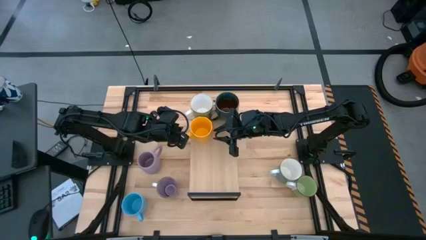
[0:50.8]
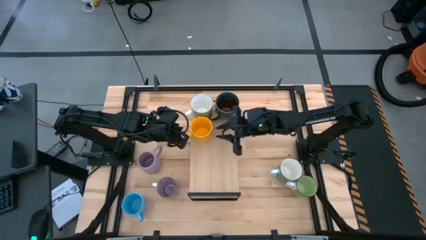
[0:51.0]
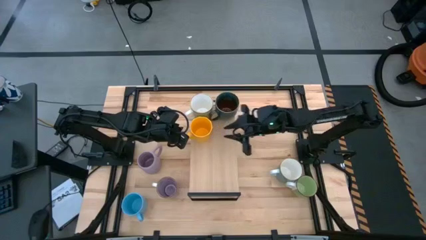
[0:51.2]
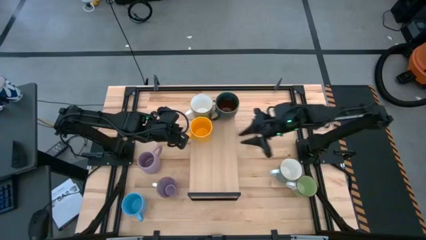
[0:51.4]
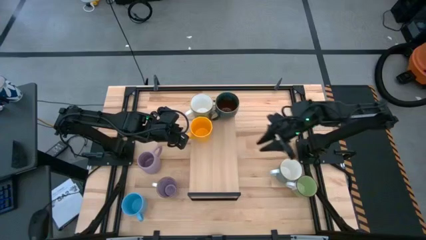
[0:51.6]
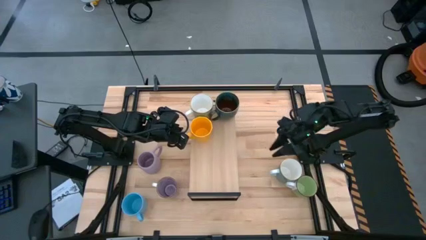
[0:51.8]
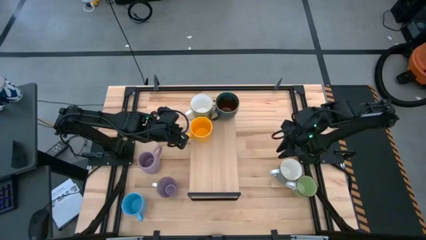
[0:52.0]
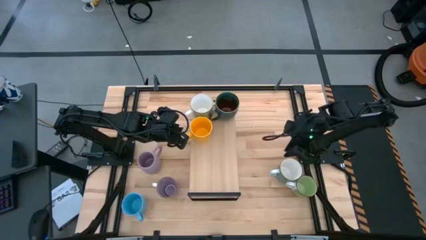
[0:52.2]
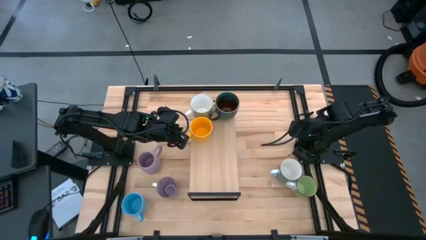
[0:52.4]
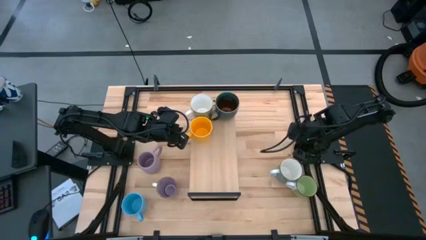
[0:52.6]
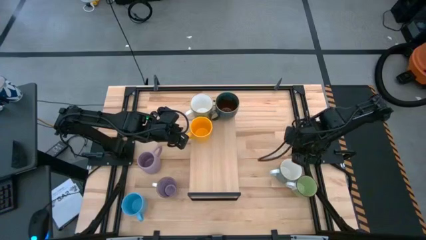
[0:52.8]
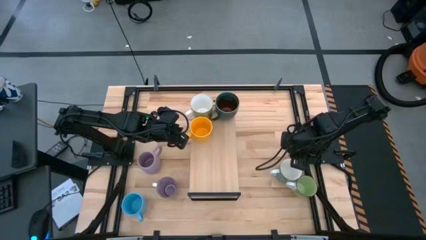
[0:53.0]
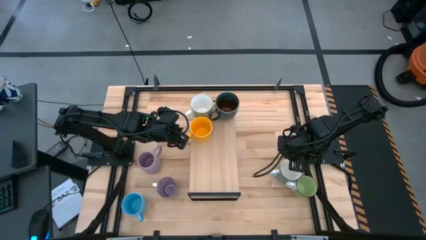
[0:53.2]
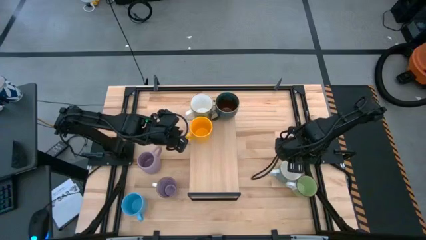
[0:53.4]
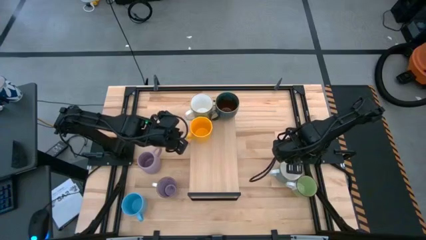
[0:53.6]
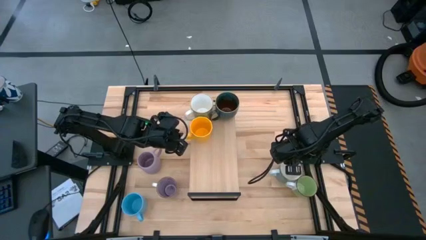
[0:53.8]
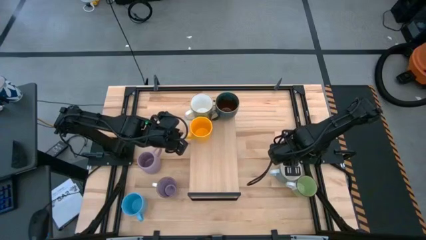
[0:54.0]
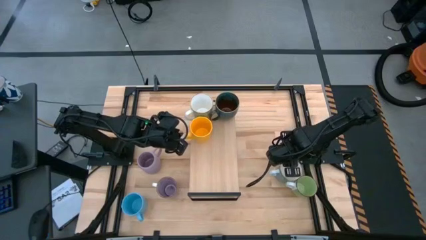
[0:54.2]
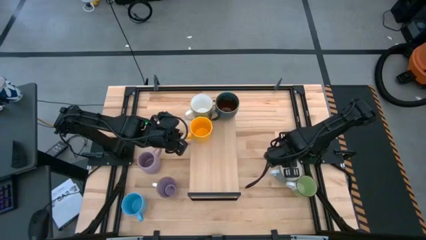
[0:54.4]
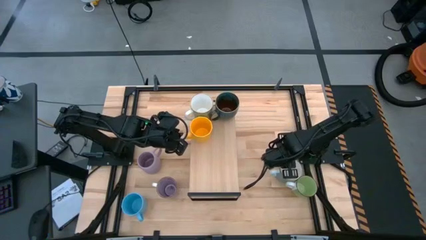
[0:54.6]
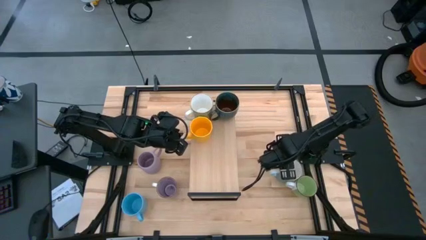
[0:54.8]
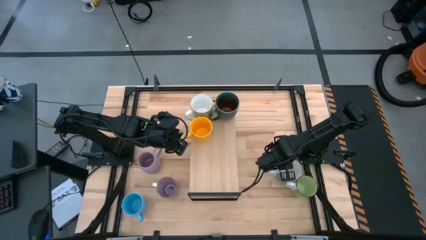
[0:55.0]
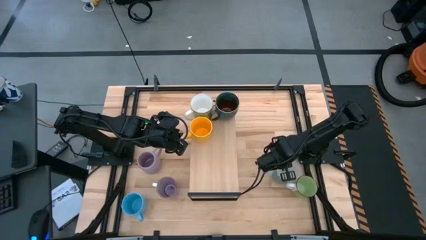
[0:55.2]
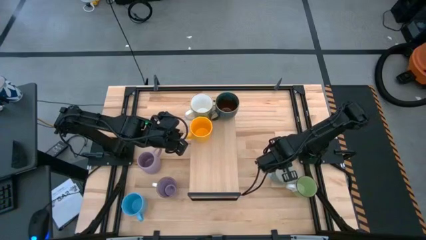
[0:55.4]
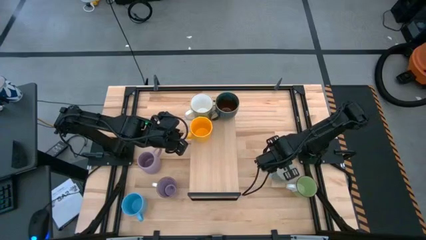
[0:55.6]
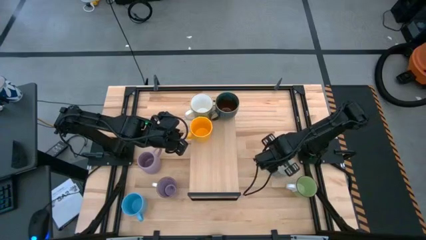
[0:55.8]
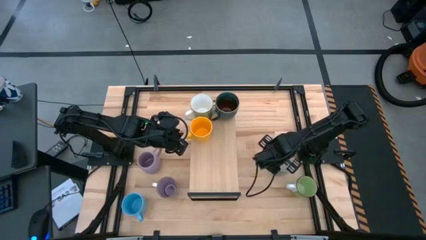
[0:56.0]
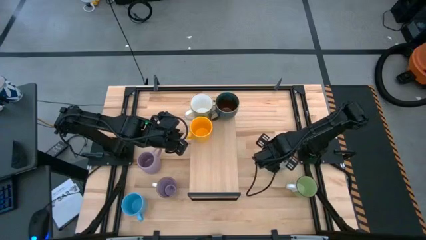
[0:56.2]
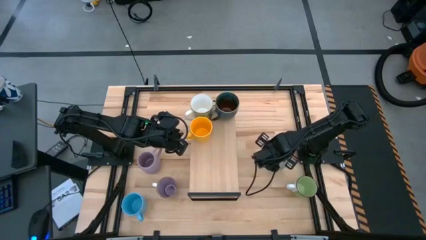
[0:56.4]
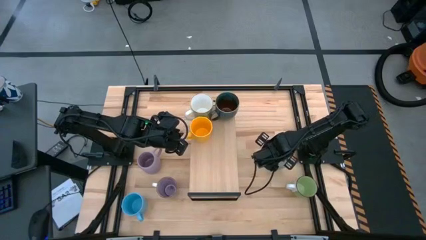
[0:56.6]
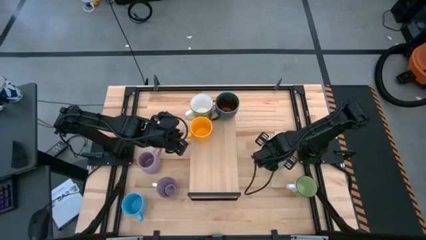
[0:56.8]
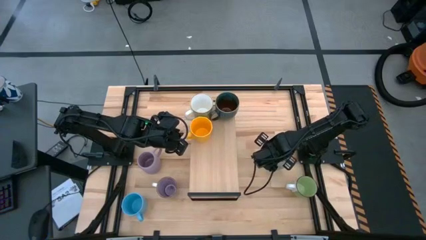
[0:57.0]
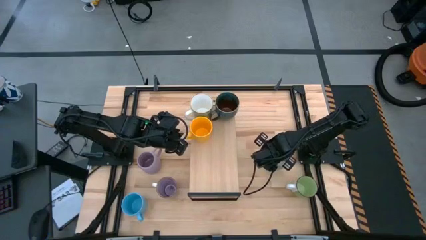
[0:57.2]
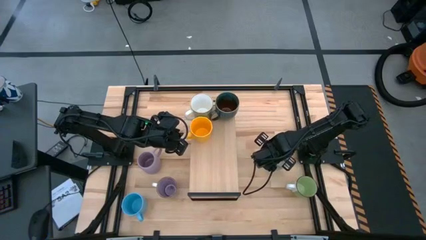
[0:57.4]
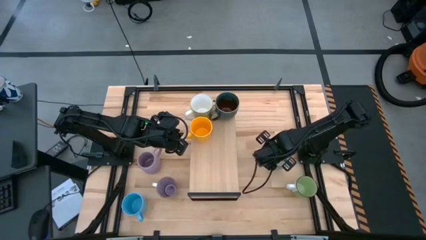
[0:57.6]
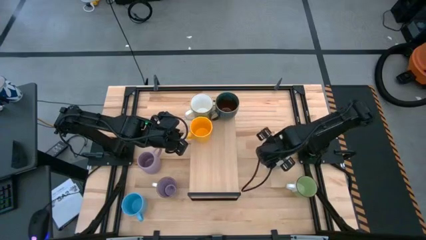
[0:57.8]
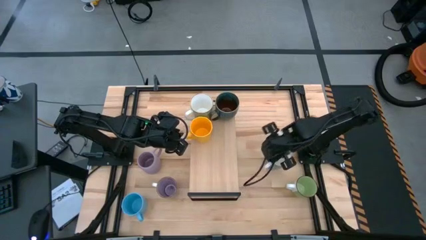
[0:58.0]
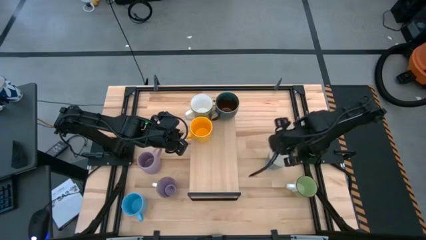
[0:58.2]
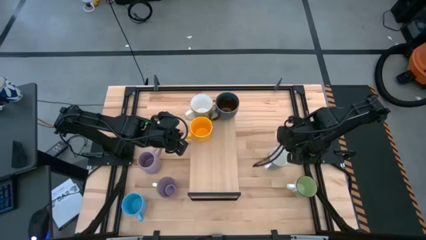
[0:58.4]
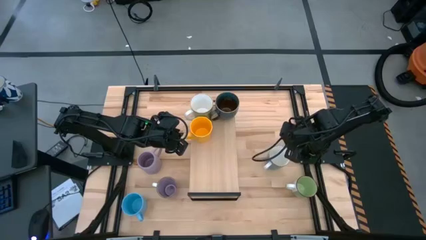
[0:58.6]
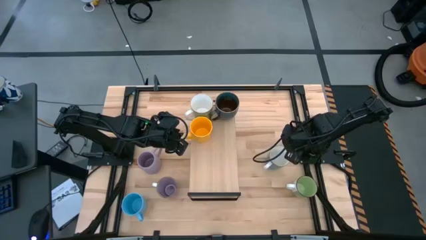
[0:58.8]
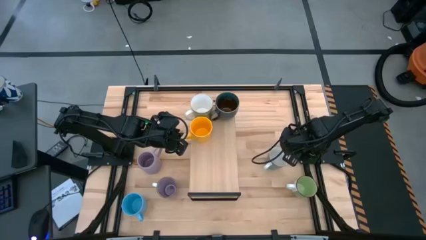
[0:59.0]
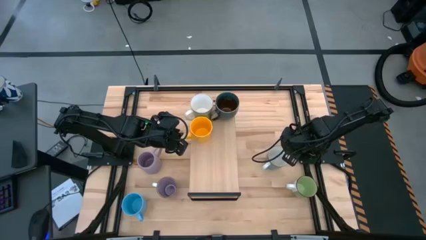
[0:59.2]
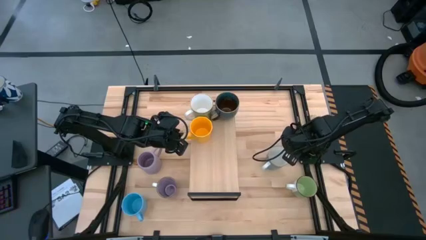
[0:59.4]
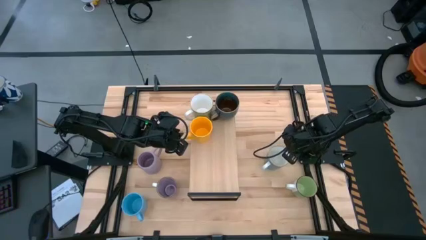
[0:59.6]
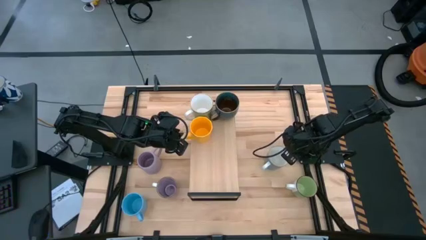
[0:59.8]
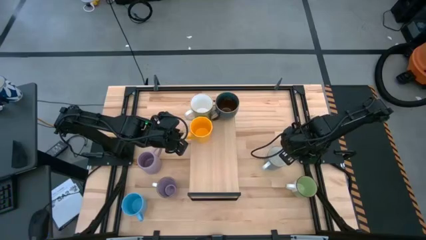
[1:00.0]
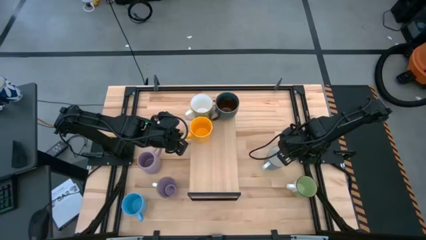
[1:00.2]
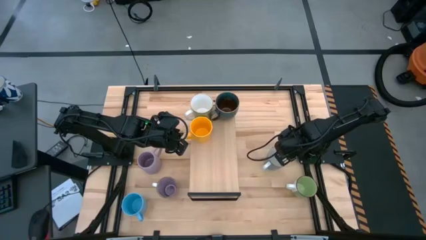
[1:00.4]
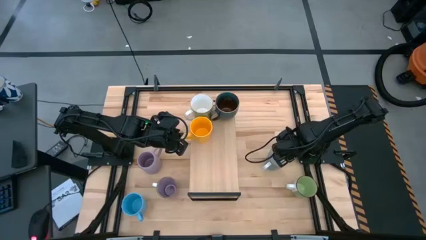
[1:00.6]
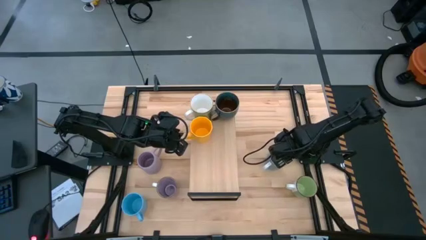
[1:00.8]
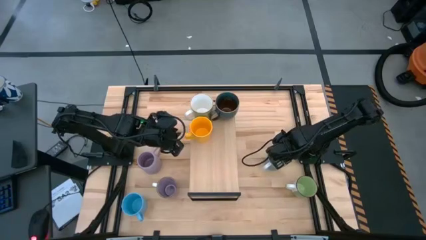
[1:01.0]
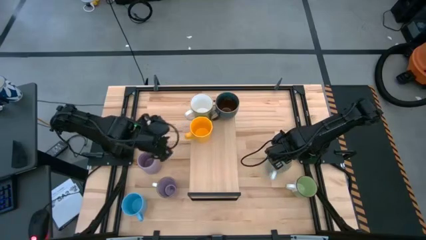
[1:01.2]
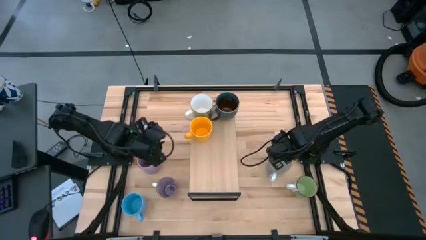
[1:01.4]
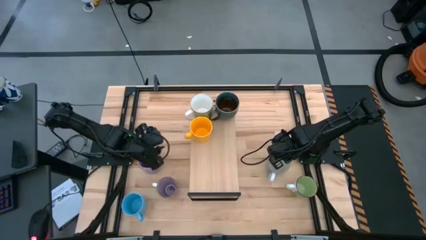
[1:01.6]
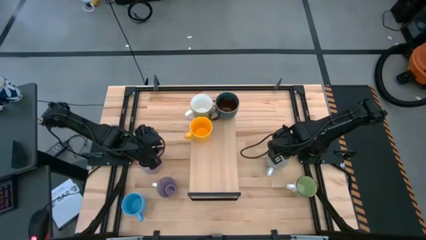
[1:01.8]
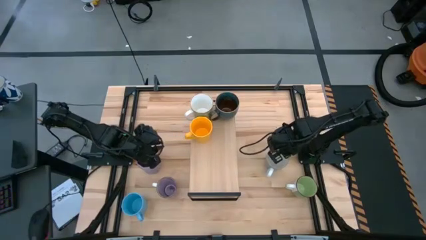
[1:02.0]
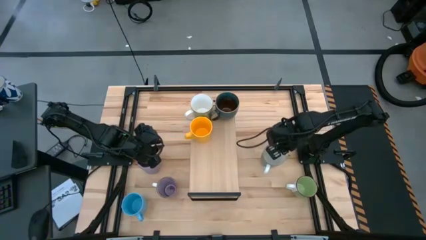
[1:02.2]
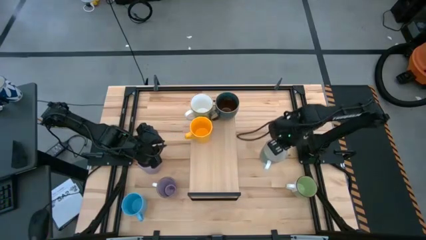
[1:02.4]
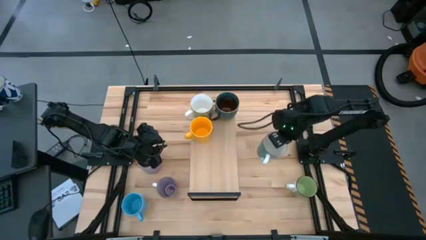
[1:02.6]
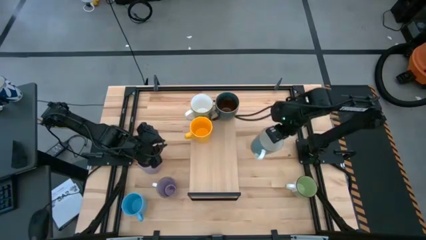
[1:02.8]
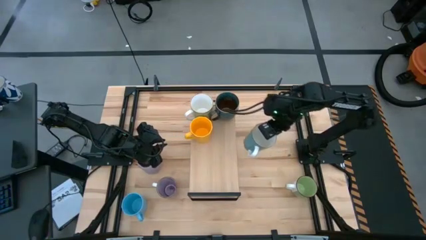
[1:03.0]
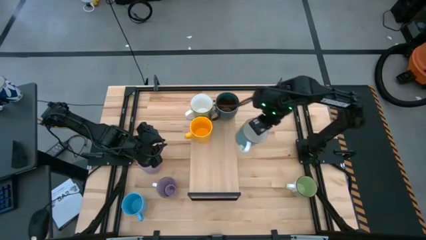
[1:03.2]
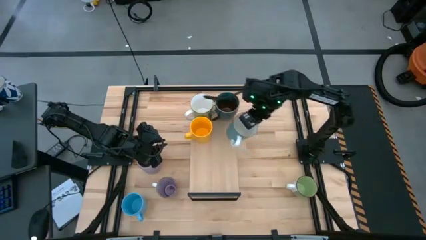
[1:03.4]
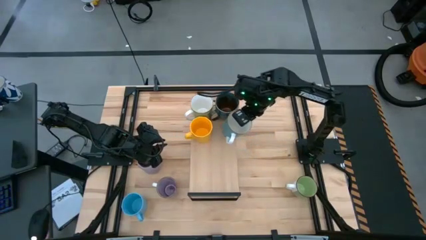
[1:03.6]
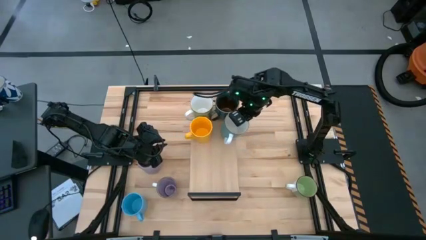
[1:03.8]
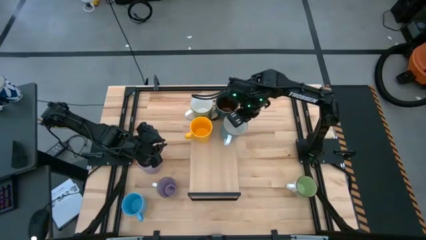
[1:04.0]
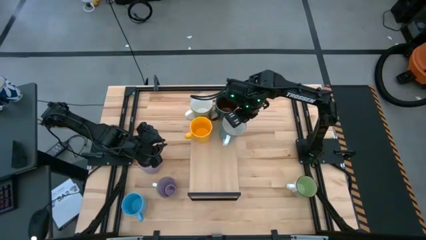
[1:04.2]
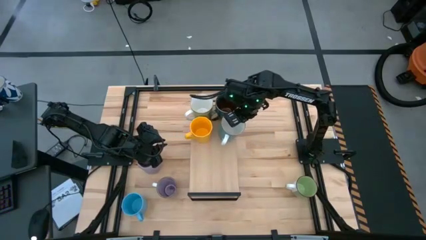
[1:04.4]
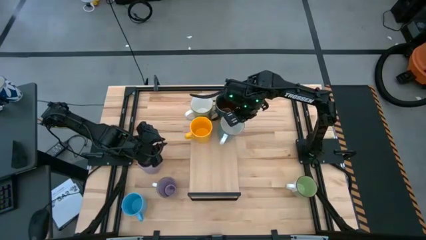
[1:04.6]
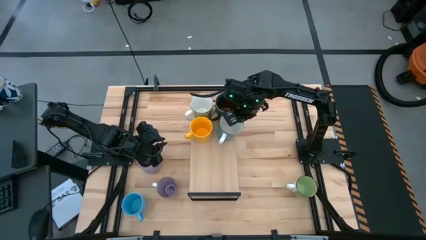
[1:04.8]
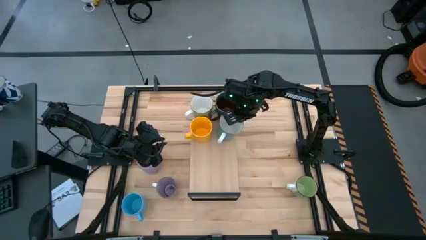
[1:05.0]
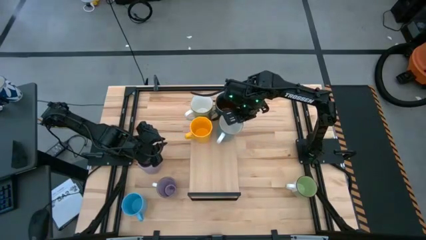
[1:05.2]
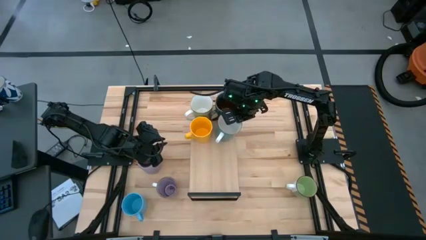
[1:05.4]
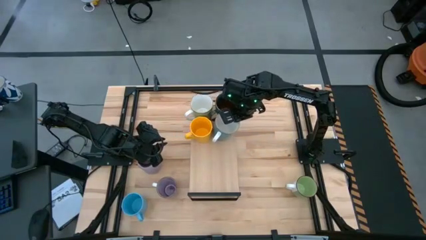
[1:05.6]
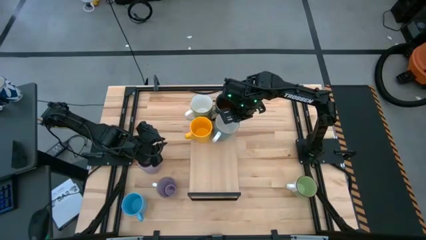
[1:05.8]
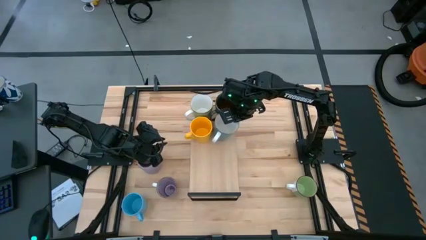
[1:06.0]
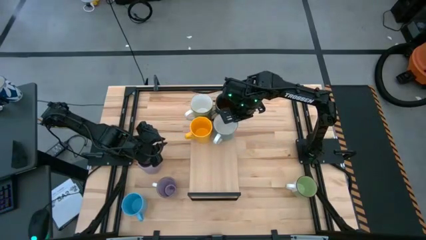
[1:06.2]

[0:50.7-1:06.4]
Task: Place coffee mugs
Put the light blue mug on the shelf
